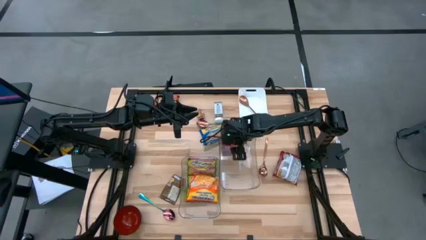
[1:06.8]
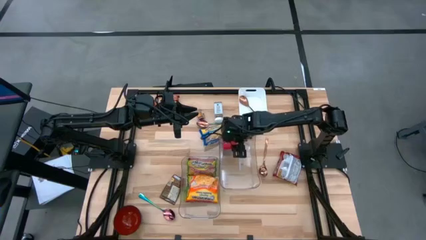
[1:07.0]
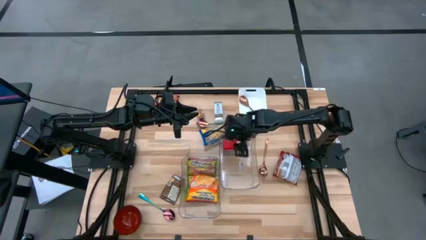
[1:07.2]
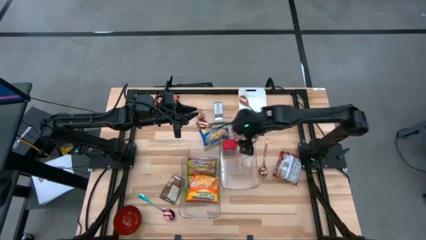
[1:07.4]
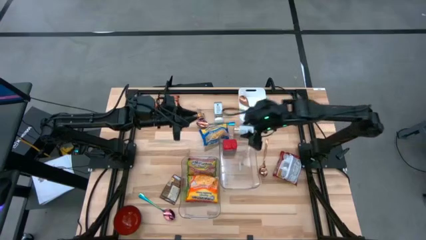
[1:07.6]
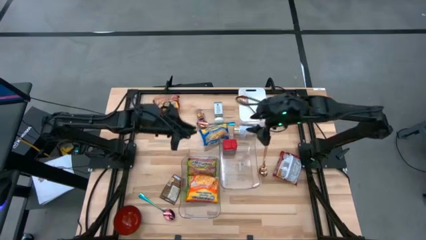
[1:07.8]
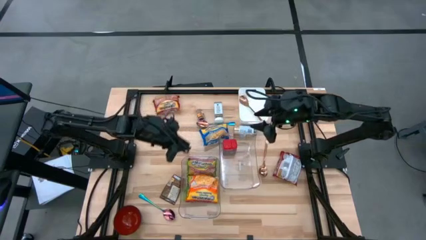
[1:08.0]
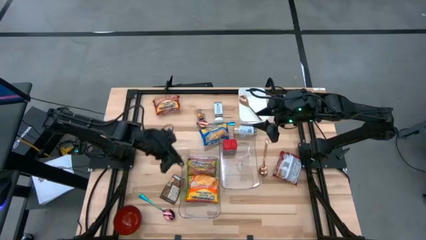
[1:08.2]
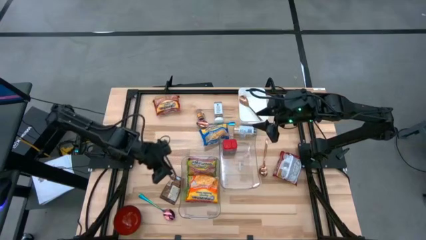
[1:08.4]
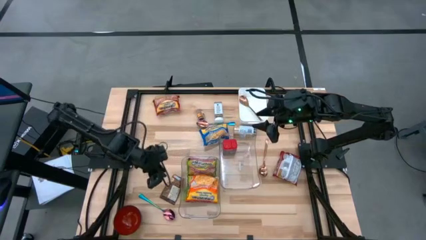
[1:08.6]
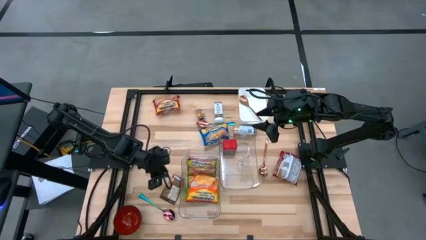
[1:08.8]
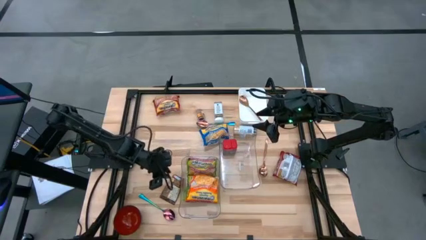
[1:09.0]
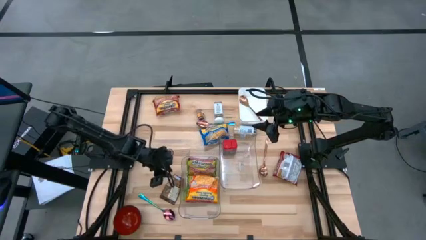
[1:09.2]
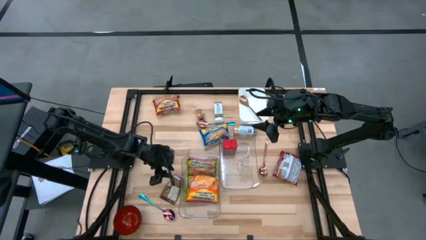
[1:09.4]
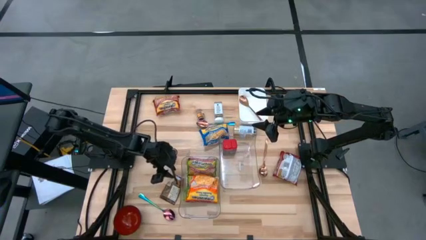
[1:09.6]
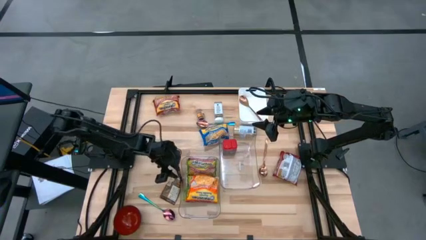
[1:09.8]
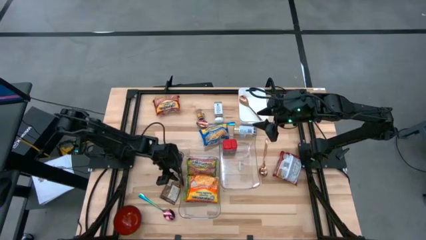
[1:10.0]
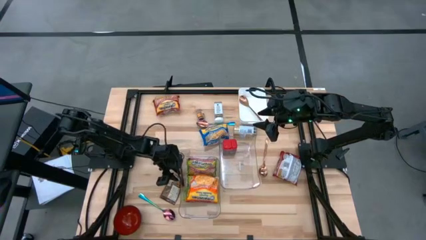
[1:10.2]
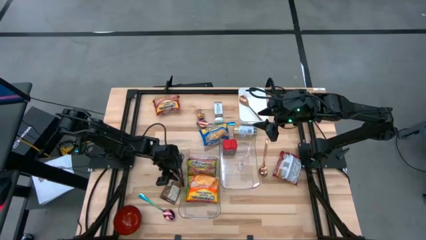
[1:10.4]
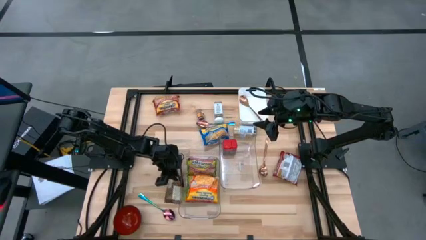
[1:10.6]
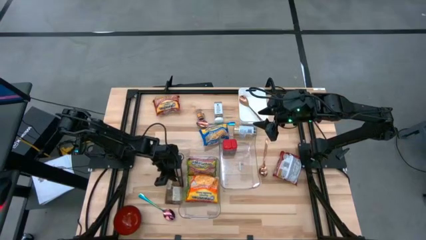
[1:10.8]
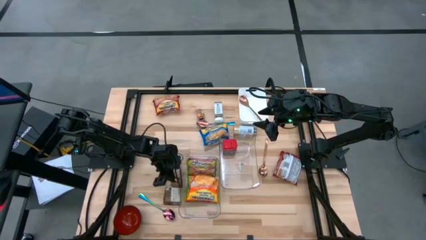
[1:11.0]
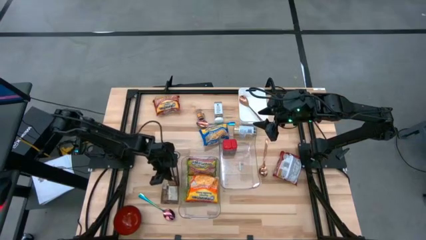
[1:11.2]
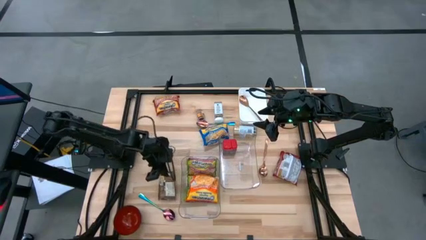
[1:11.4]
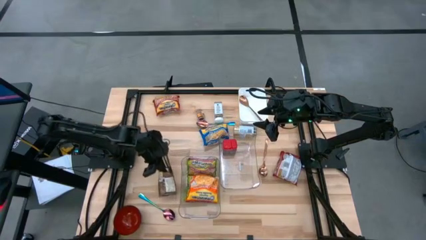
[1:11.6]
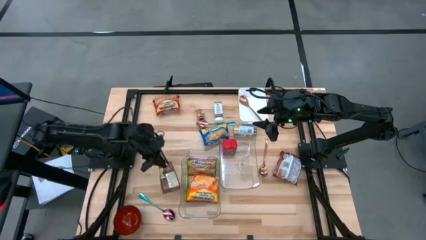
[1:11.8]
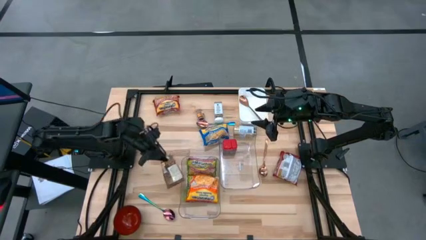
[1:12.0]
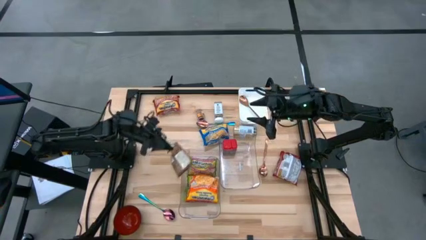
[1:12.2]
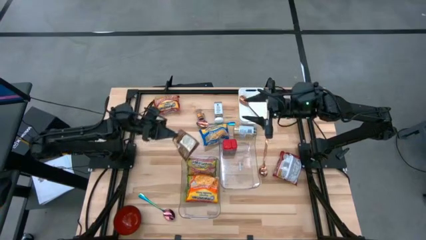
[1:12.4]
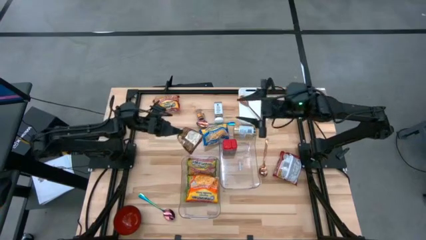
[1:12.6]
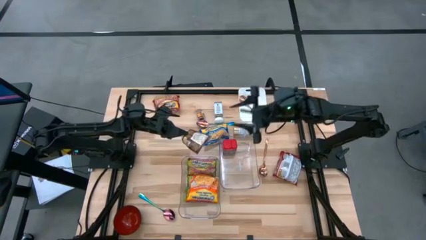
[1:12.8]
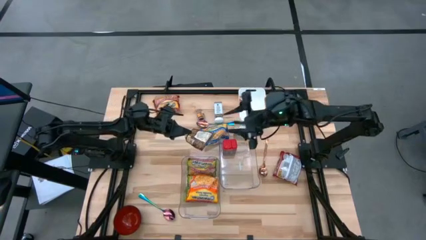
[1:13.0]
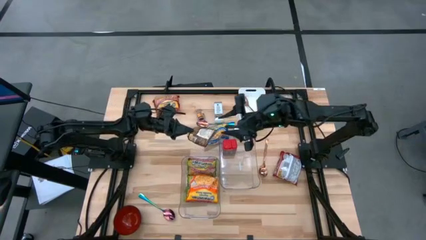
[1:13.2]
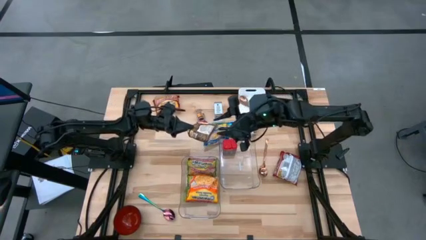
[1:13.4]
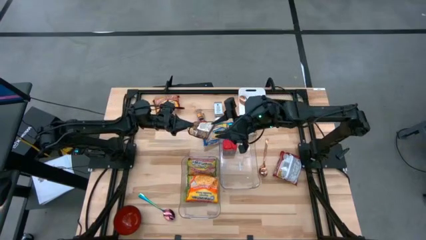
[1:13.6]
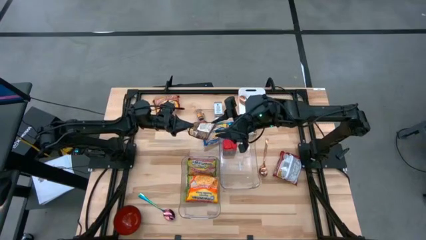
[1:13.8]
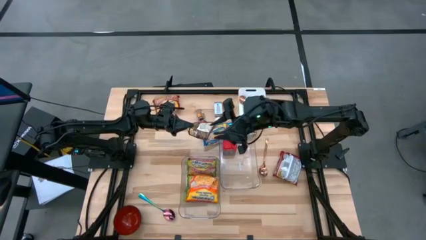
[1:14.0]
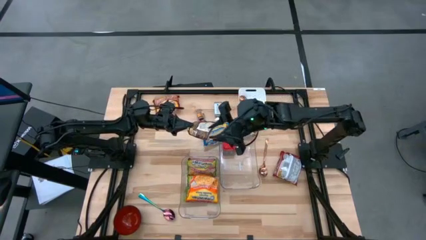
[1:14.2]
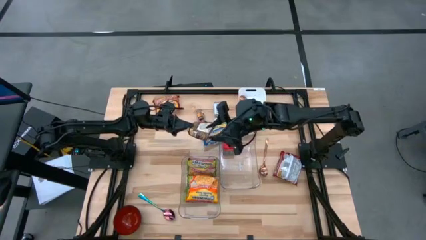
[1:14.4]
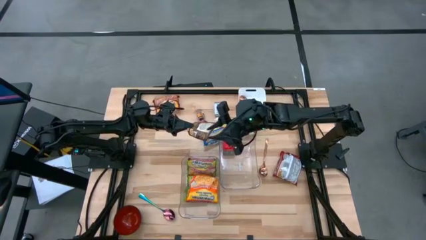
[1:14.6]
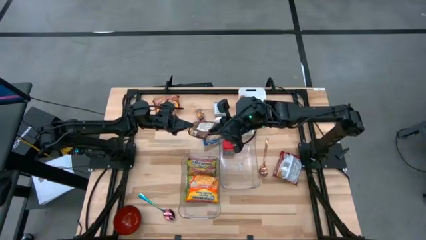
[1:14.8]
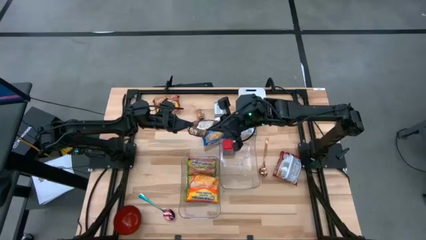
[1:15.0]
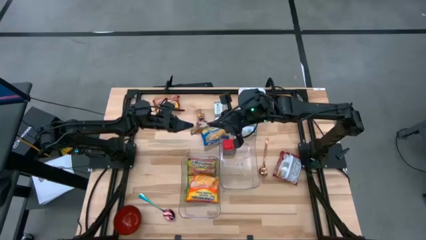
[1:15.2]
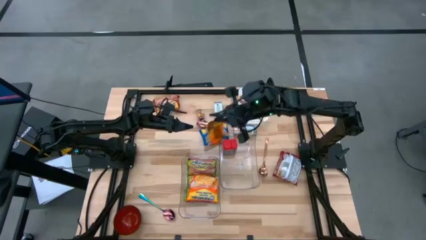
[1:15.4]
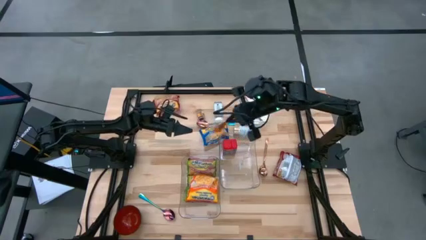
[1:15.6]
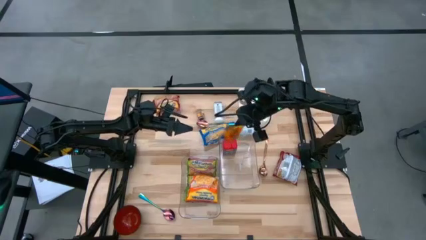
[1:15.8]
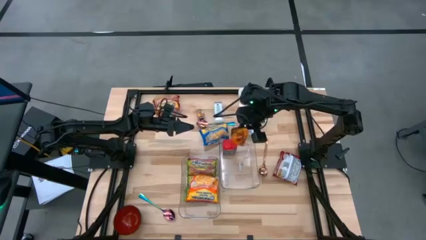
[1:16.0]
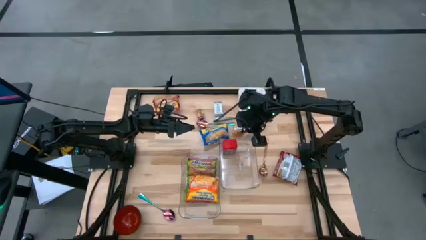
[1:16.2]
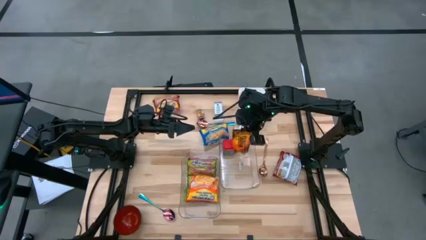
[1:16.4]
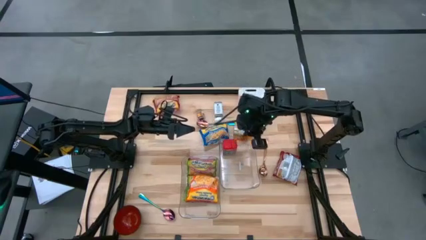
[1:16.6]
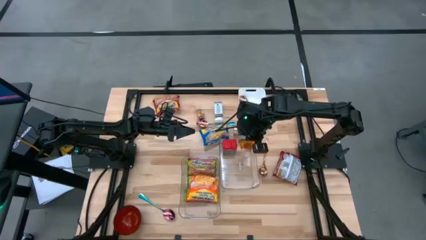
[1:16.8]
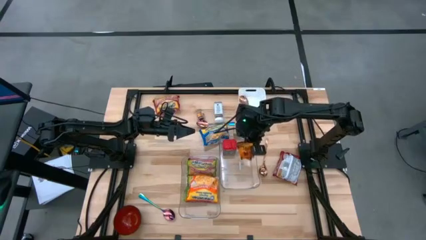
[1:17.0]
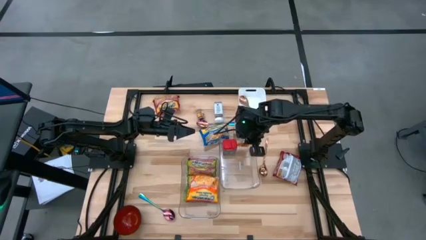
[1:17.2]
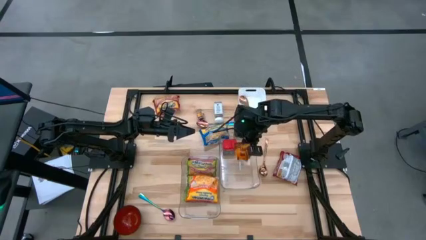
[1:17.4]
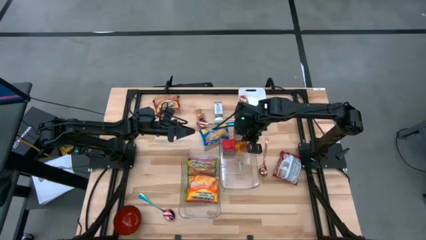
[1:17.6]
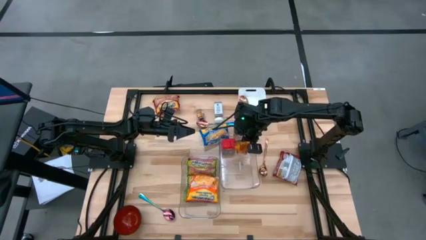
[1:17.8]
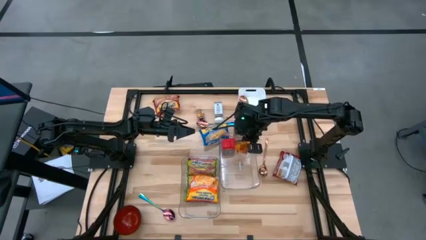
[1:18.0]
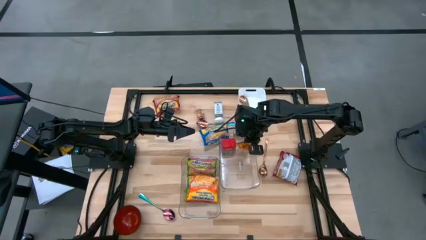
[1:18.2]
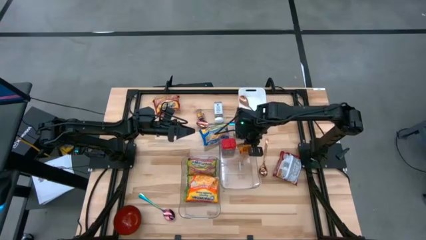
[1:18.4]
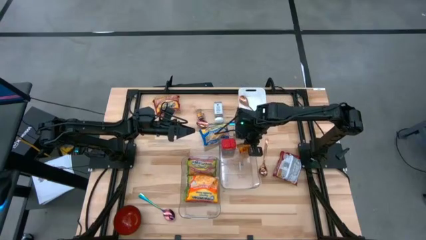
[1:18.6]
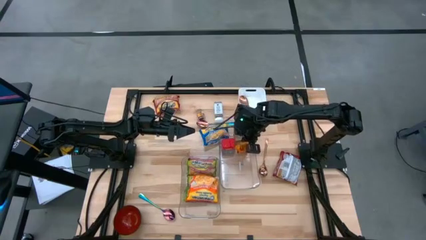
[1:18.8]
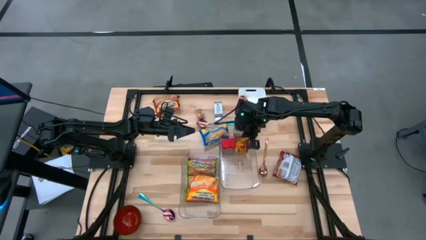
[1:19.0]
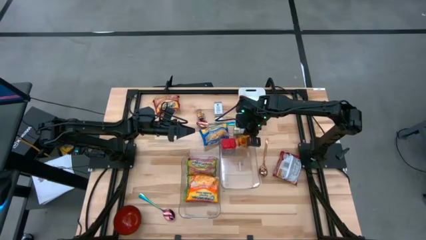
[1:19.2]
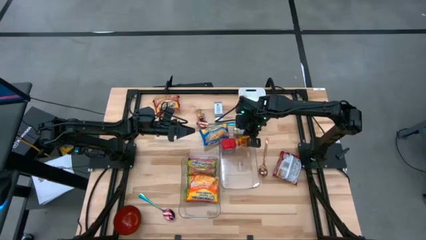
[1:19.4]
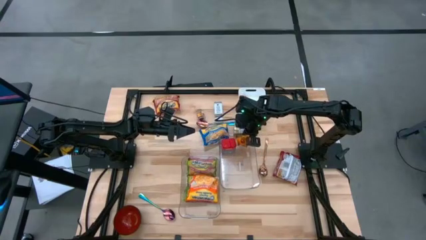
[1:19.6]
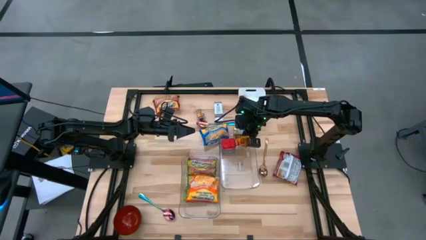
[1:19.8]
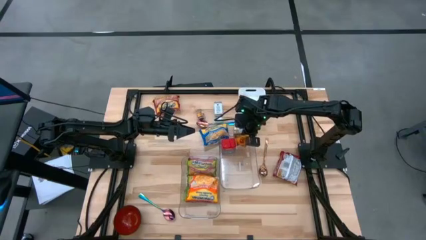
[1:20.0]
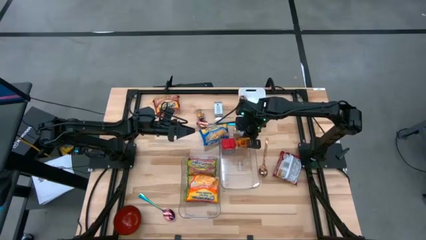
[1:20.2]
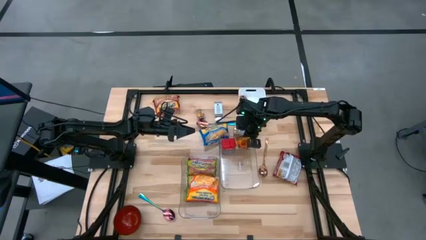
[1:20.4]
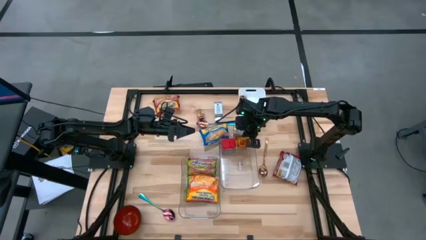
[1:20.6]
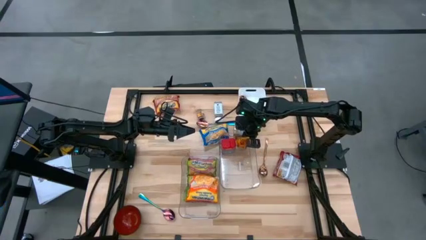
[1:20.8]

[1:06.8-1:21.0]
Task: Pick & Place Food Item
Put the orange seasoning pack into the right transparent bin

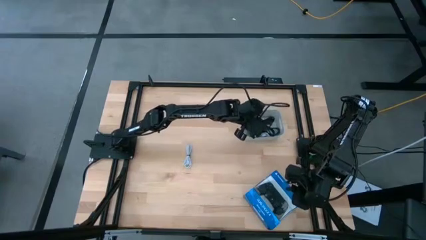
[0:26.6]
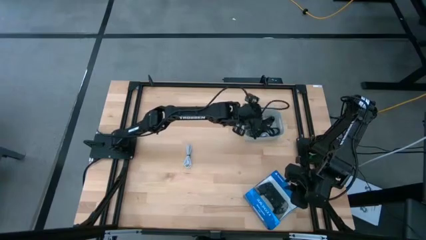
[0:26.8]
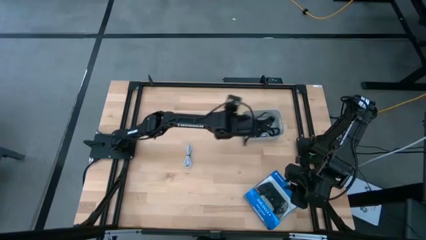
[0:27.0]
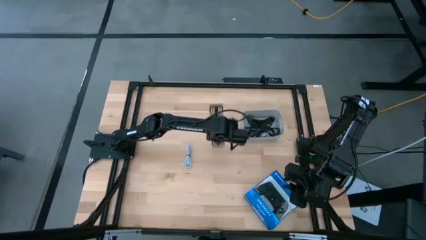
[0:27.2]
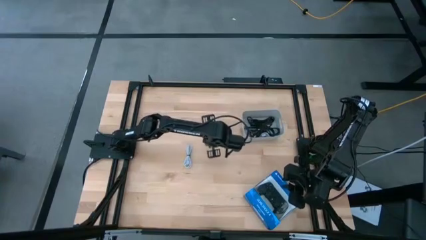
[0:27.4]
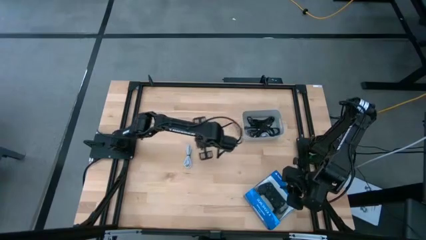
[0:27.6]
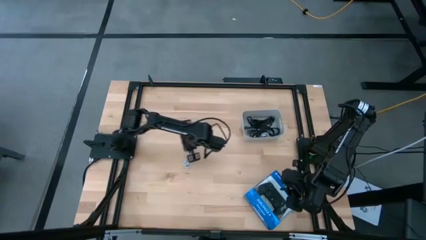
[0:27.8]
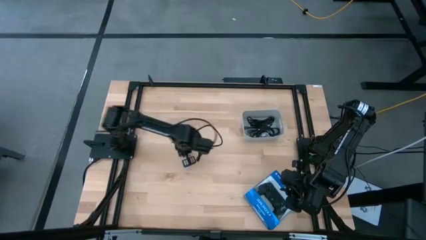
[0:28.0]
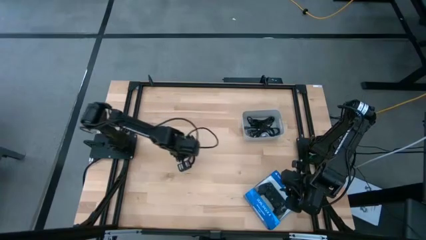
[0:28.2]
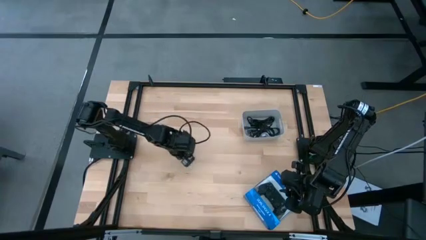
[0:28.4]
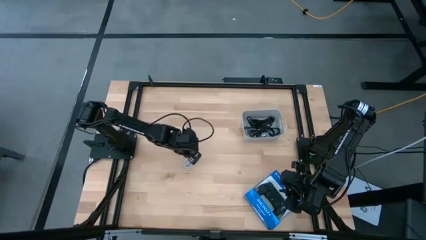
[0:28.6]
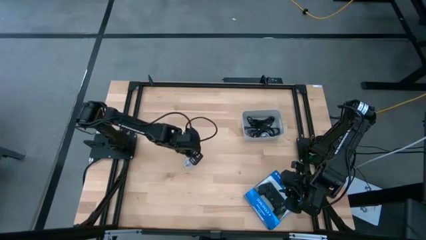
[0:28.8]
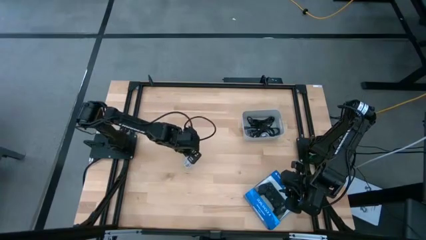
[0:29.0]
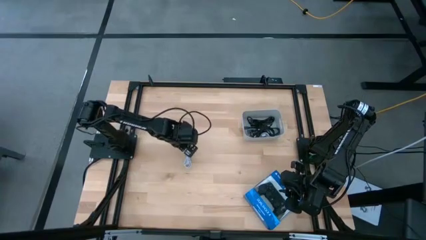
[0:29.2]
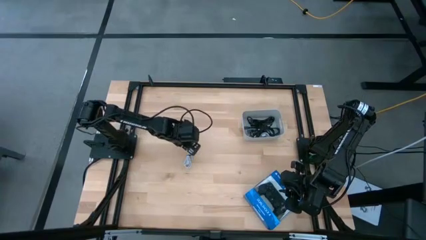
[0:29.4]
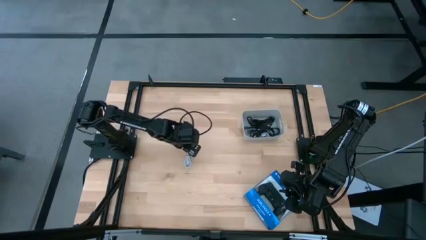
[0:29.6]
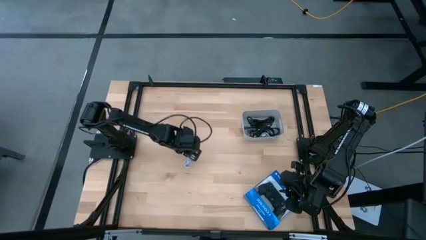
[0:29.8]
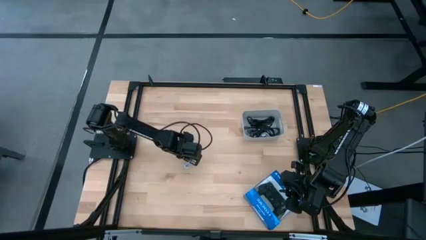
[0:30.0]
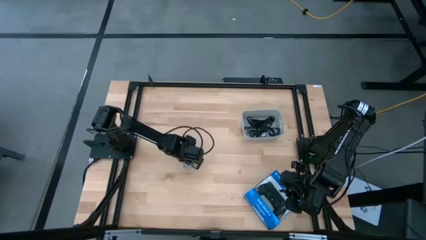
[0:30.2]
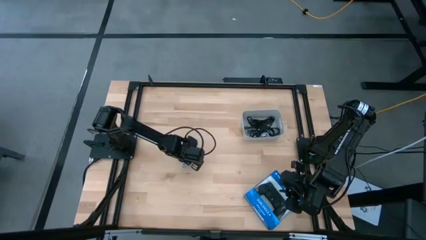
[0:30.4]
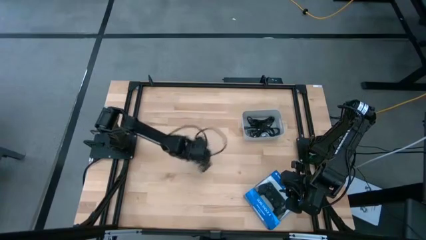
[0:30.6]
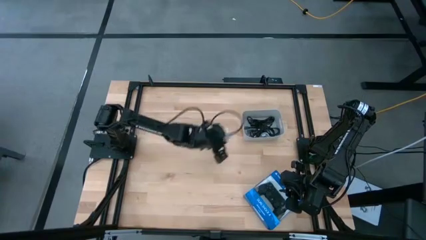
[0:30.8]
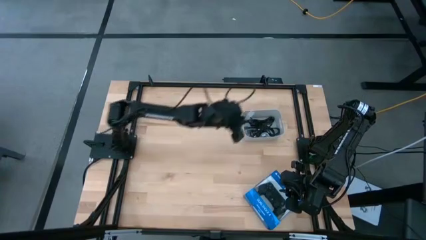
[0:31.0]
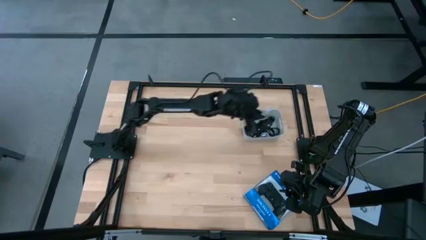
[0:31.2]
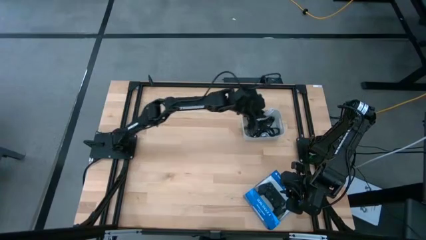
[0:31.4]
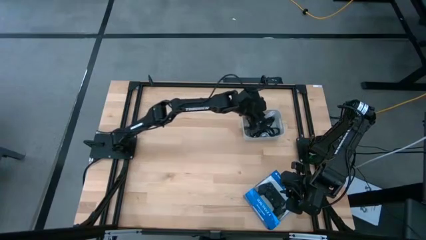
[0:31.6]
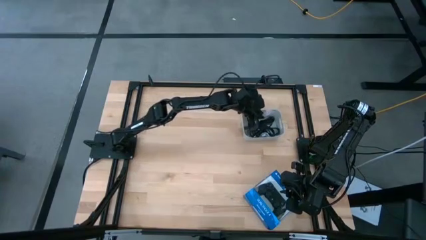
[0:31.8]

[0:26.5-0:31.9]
Task: Pick and place USB-C Cables
Put the white USB cable into the gray bin
